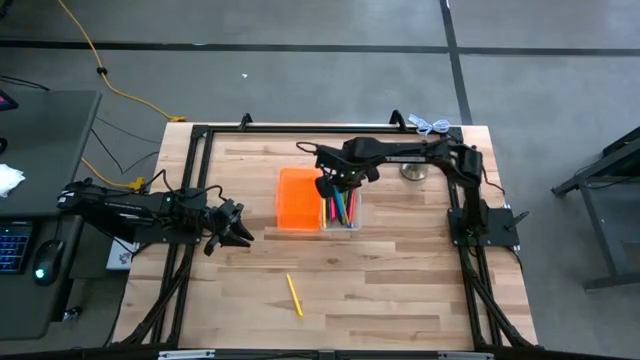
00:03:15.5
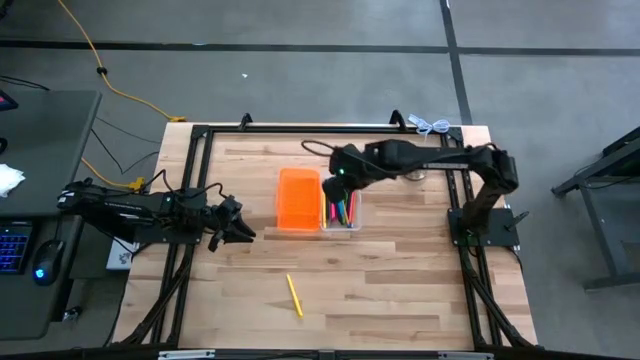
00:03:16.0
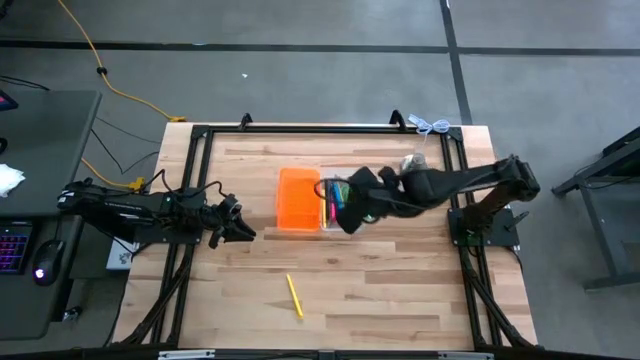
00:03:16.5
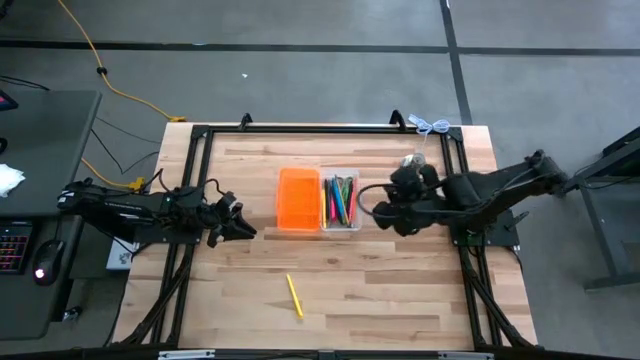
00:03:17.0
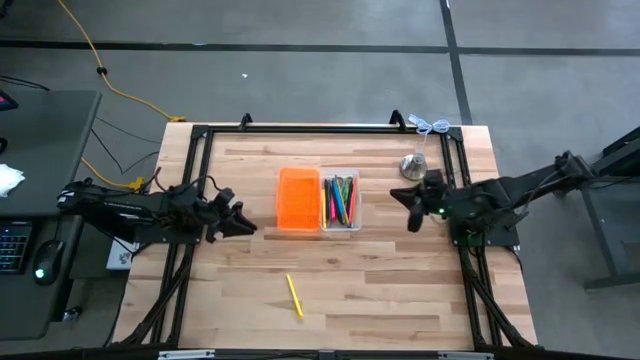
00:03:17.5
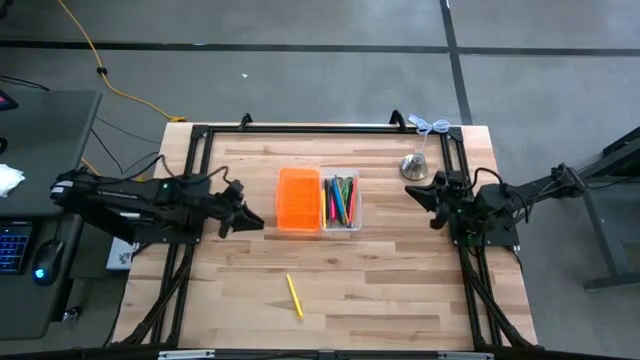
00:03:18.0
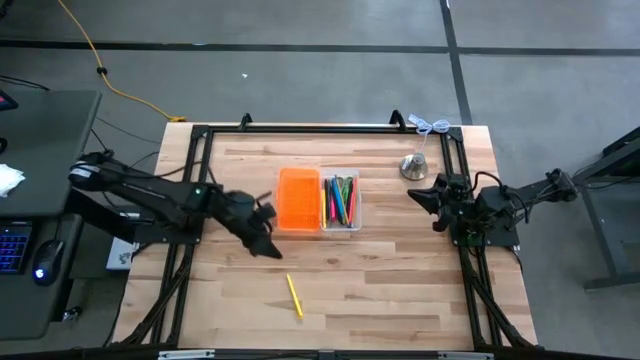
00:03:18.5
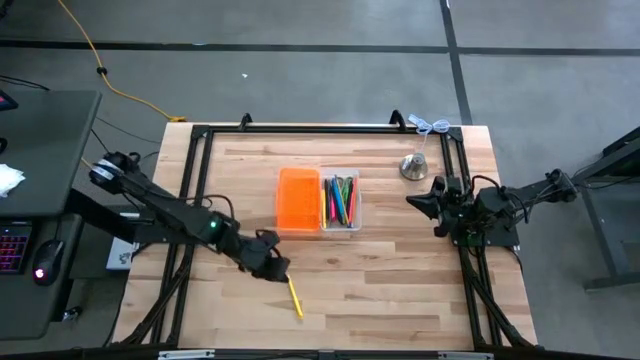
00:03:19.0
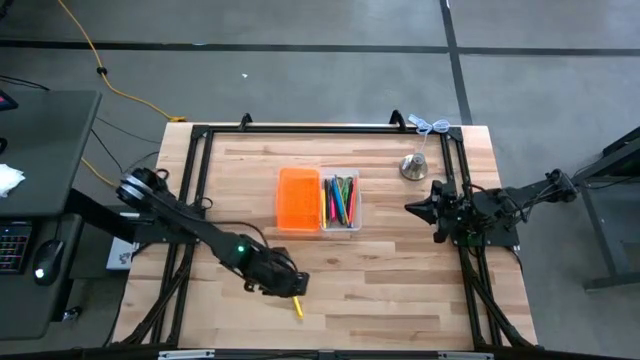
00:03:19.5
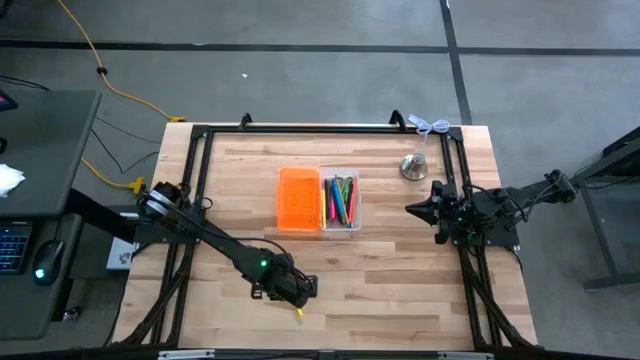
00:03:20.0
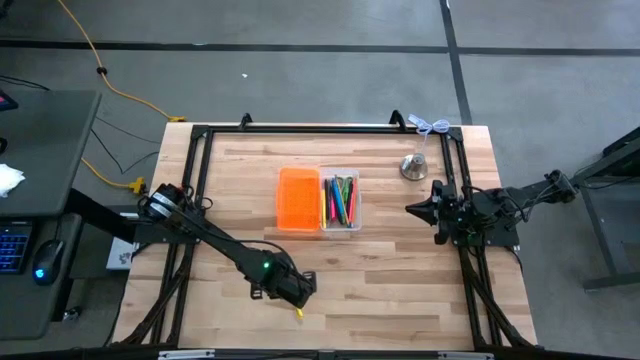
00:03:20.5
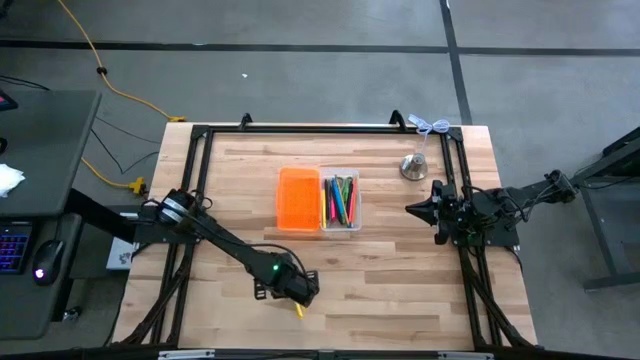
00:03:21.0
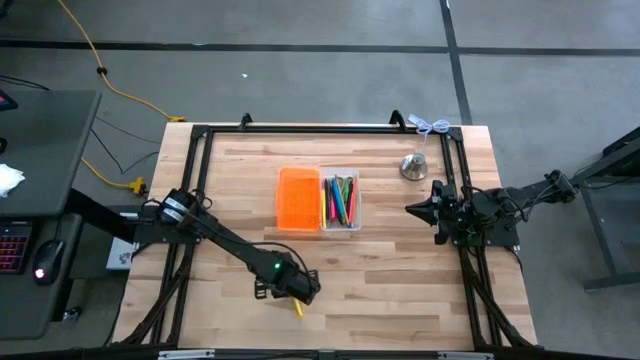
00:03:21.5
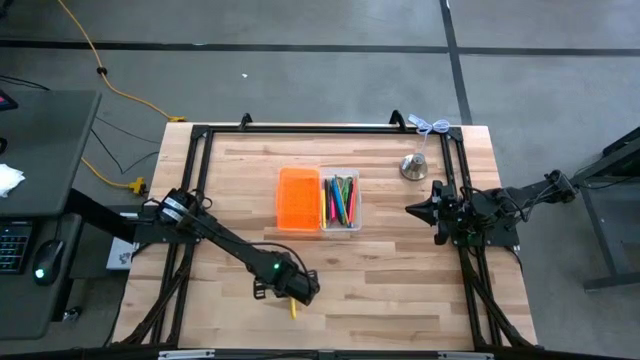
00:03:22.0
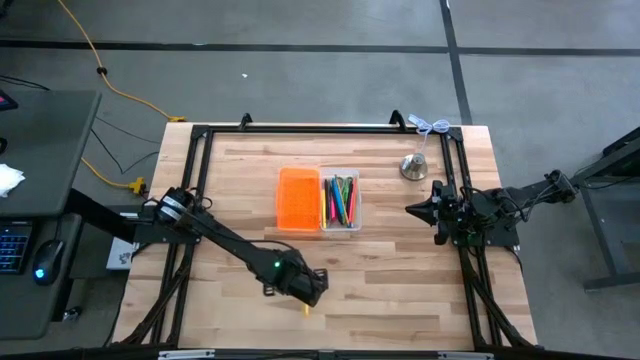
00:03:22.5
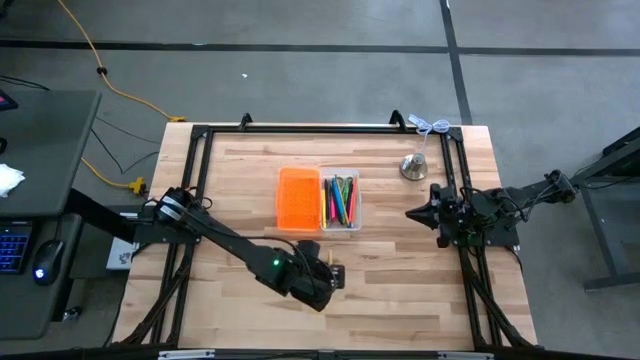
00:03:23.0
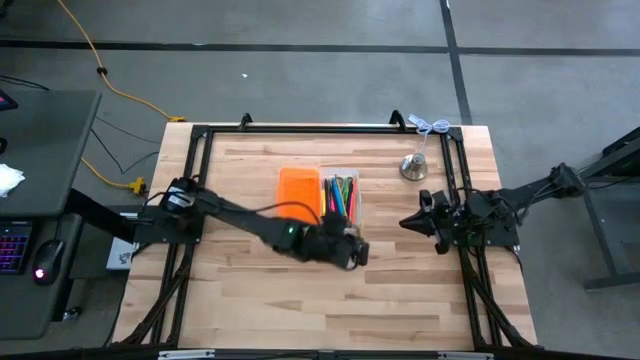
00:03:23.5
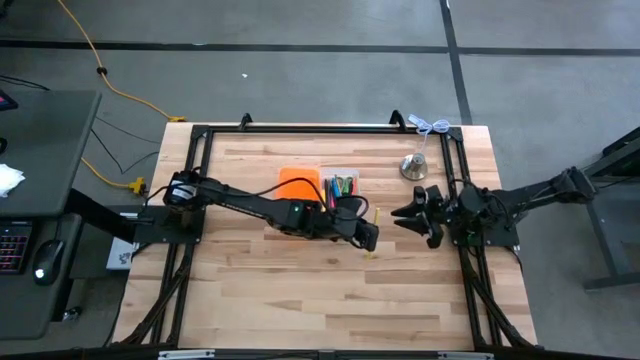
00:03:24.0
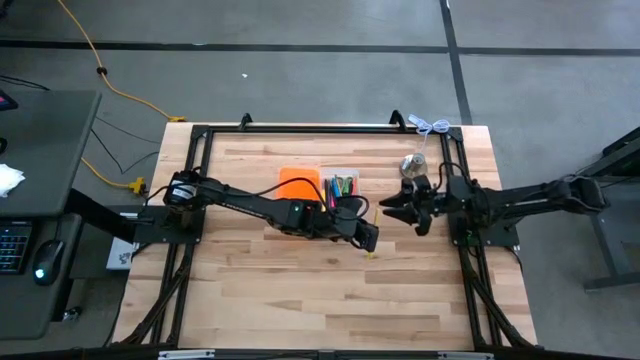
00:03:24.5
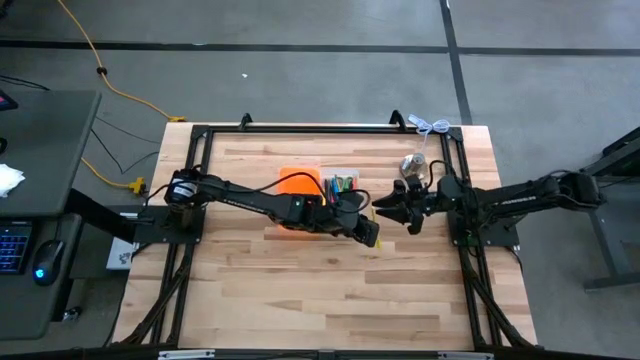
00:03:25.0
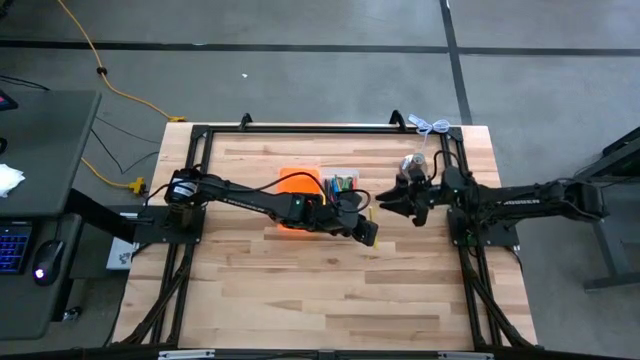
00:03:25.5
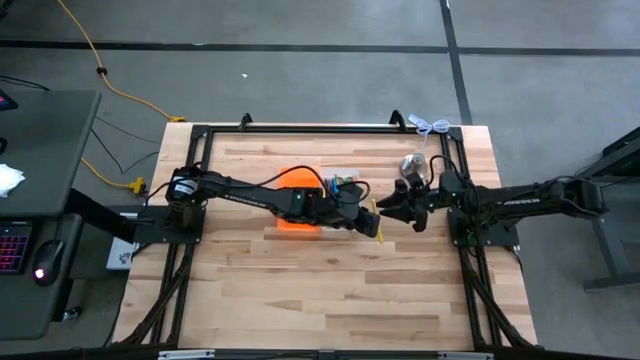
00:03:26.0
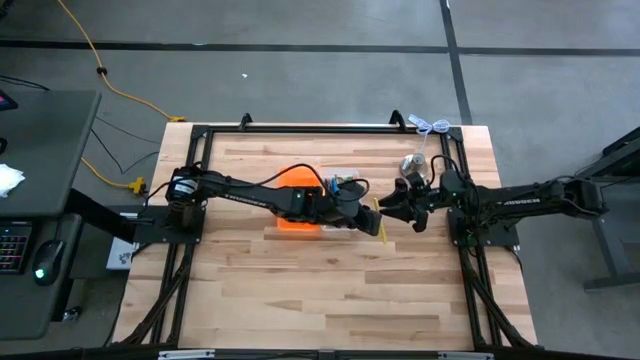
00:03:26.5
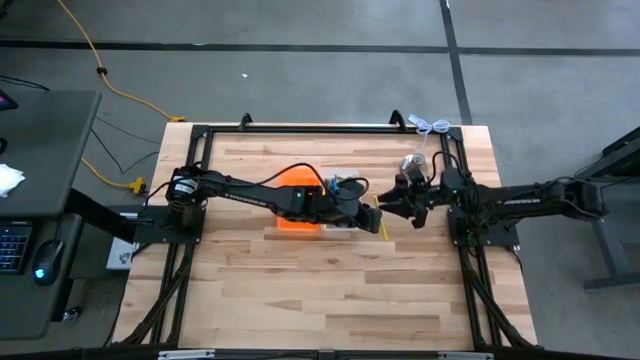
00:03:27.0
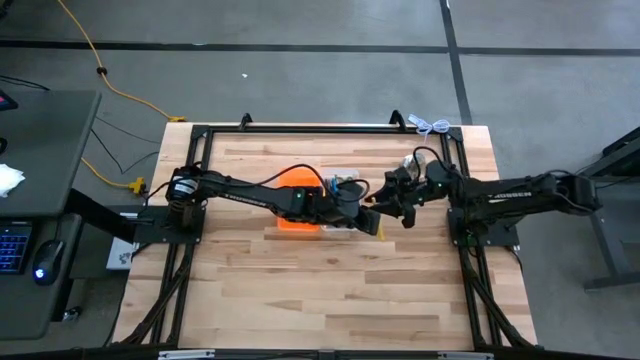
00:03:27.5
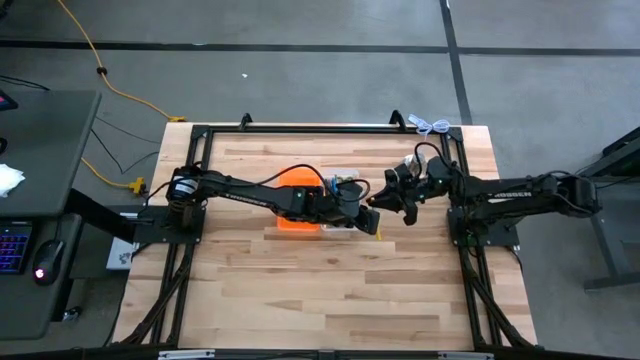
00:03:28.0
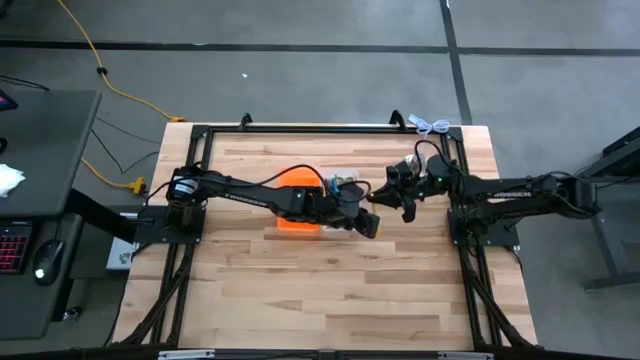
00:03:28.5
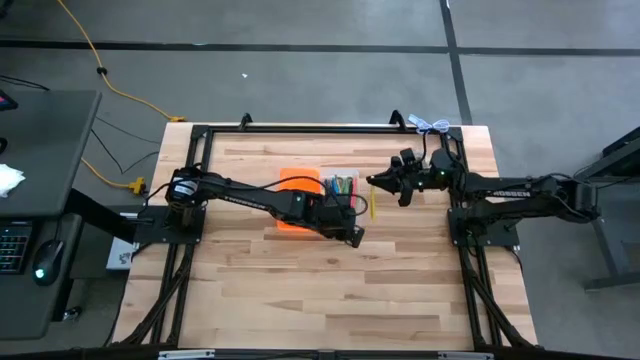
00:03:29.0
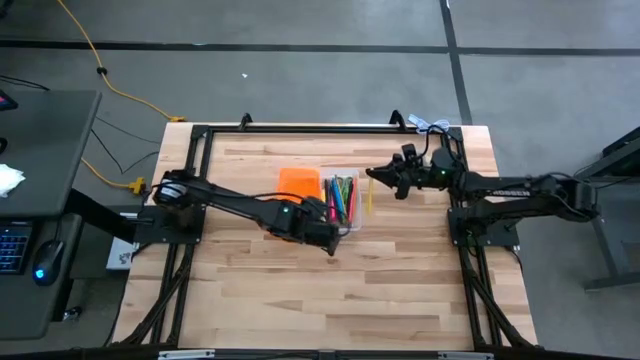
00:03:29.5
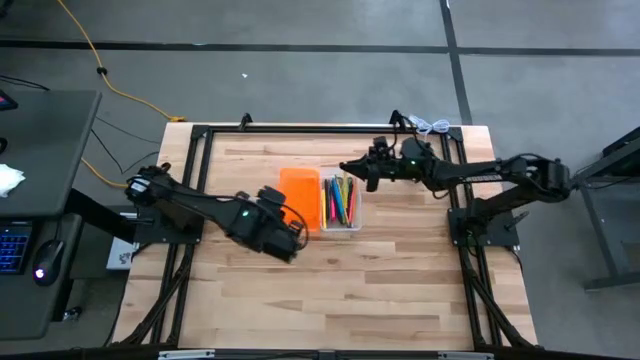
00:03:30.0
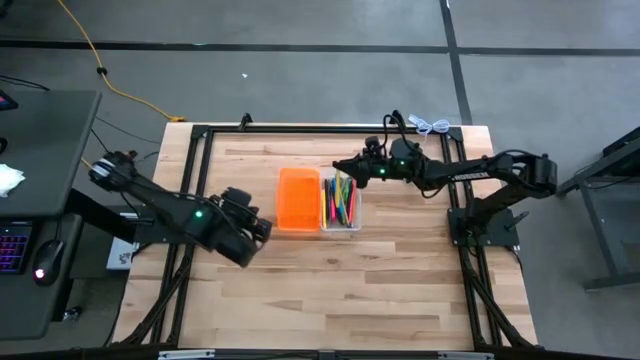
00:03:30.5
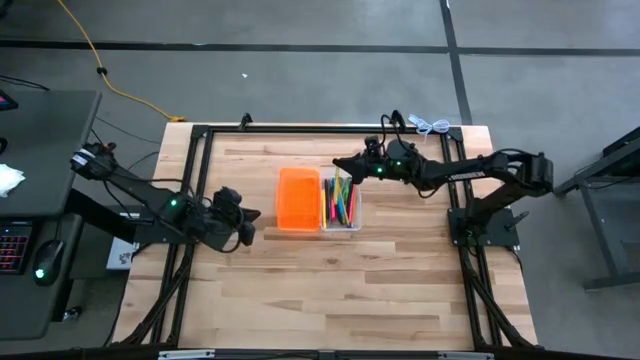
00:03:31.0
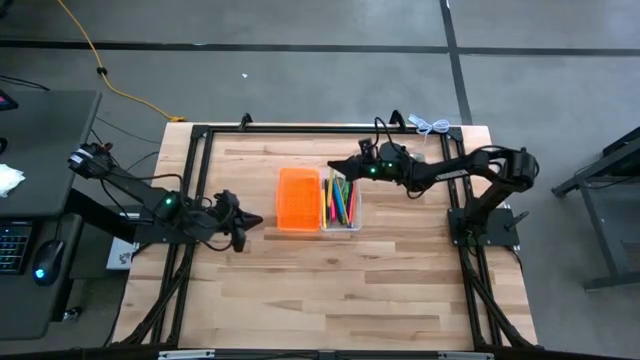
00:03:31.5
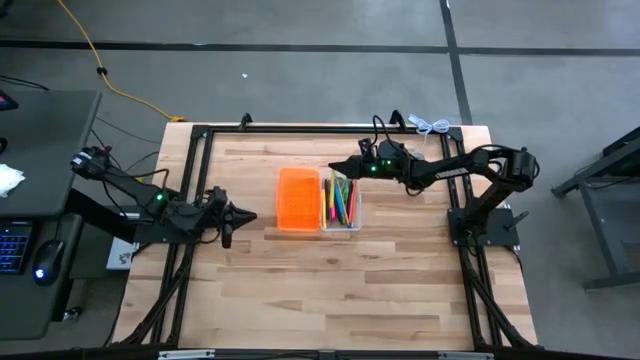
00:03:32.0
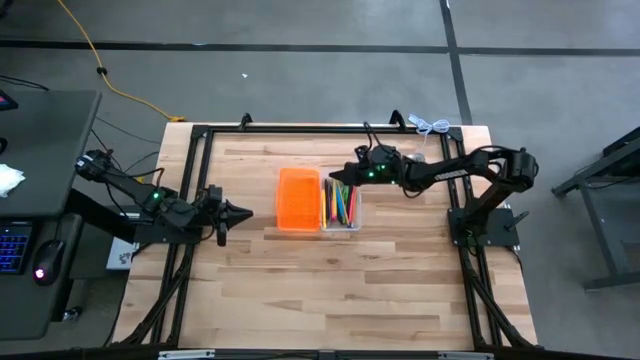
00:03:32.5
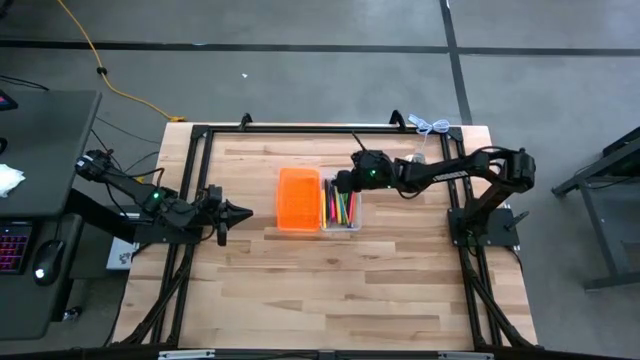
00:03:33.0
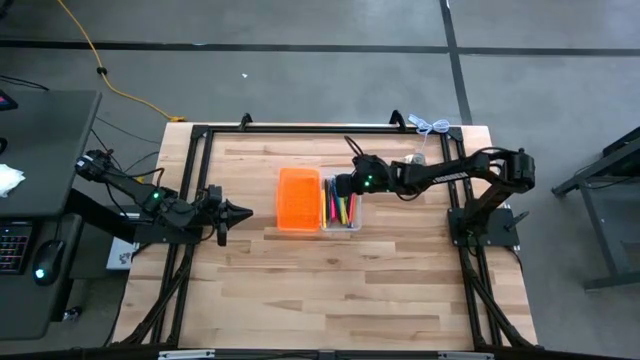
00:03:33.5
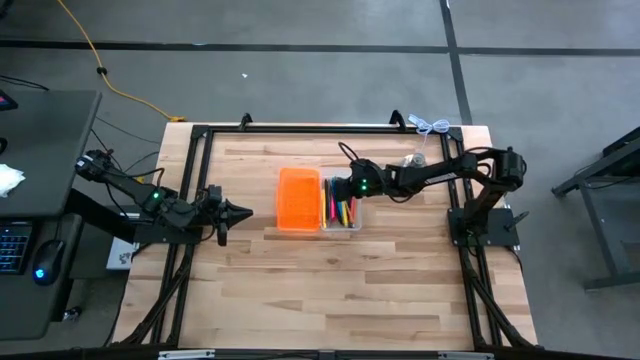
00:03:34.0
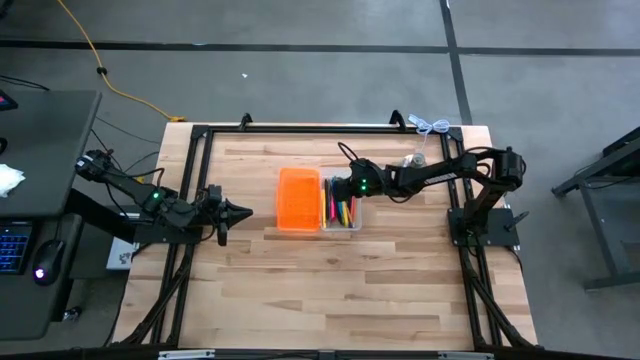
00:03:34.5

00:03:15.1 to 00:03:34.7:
Task: Pick & place school supplies into a supply box
Put the yellow pen into the supply box

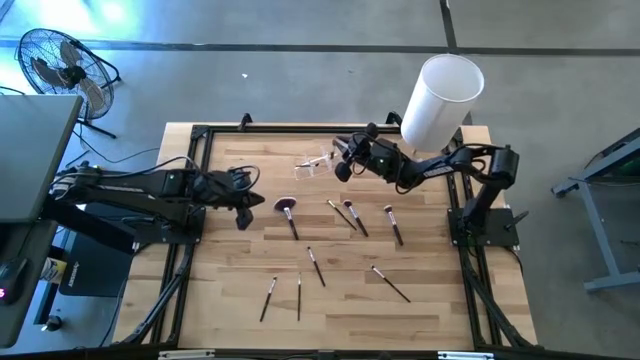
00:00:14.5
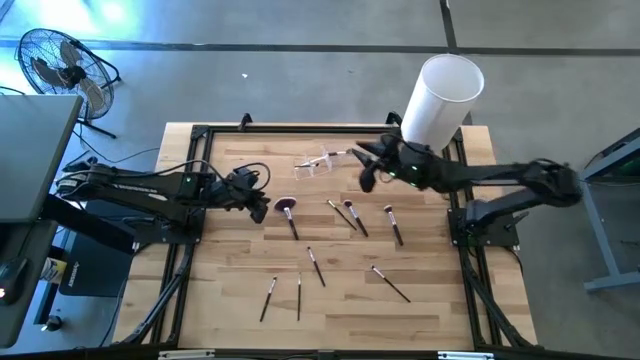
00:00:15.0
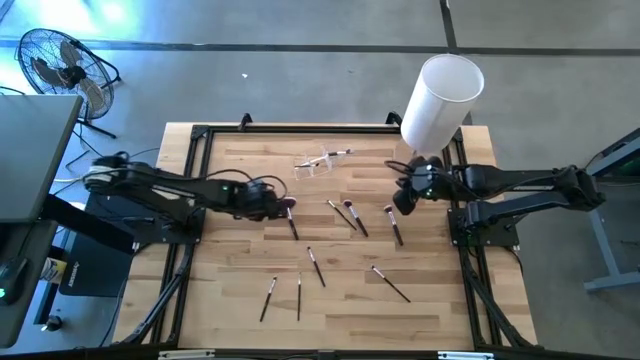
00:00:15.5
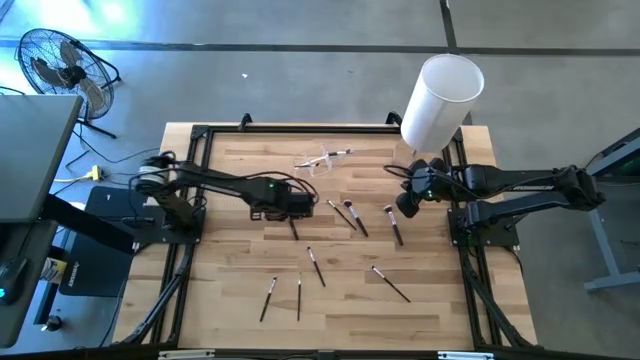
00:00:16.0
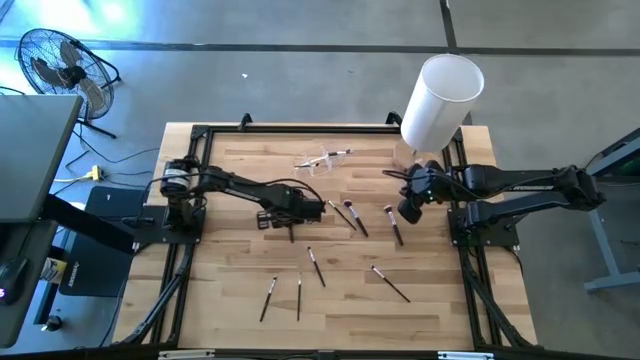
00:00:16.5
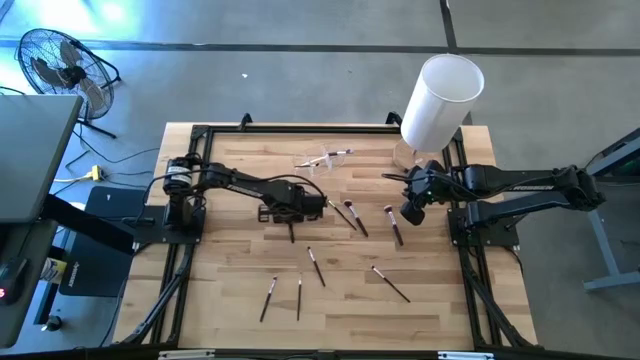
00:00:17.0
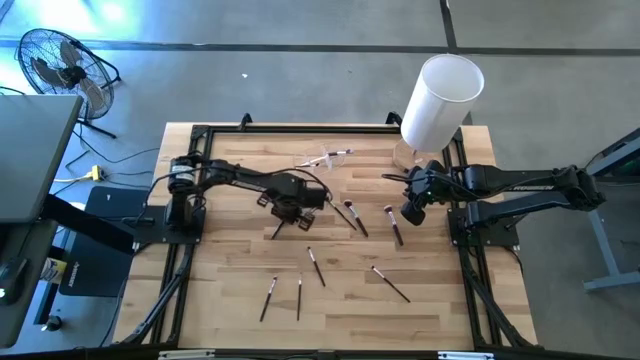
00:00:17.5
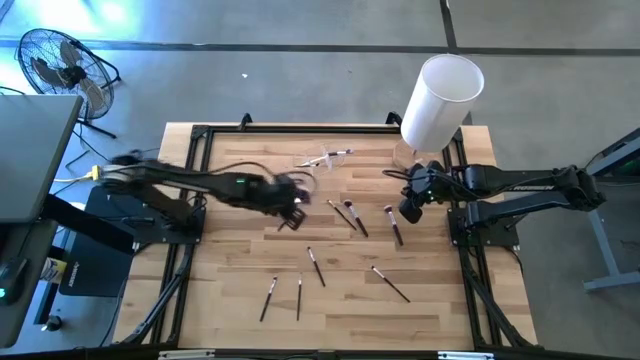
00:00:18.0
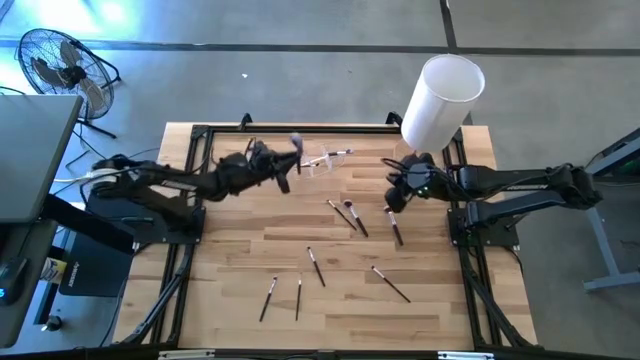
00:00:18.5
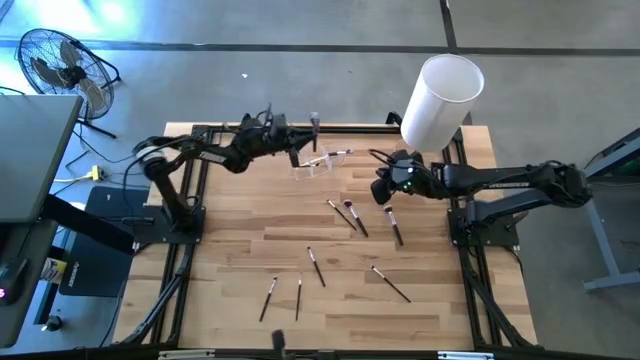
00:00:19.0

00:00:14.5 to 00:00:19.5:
Task: Put items in baskets/containers
Put the black highlighter brush into the transparent organizer
